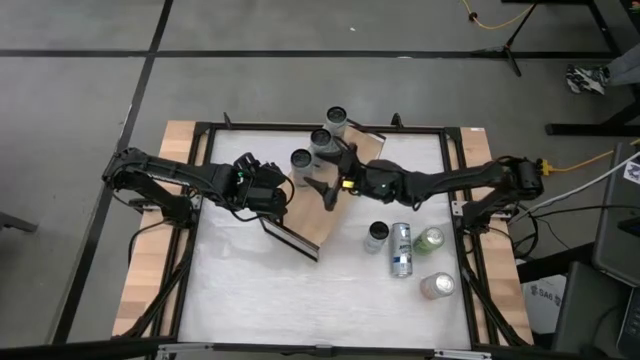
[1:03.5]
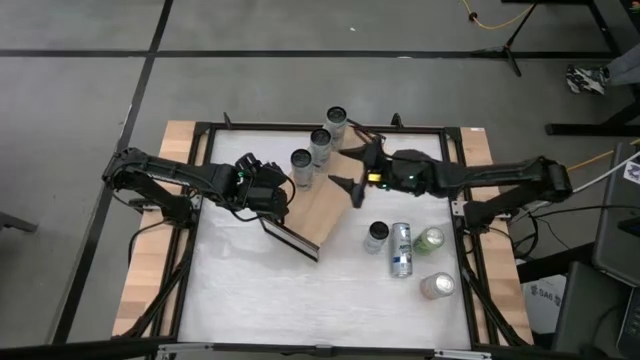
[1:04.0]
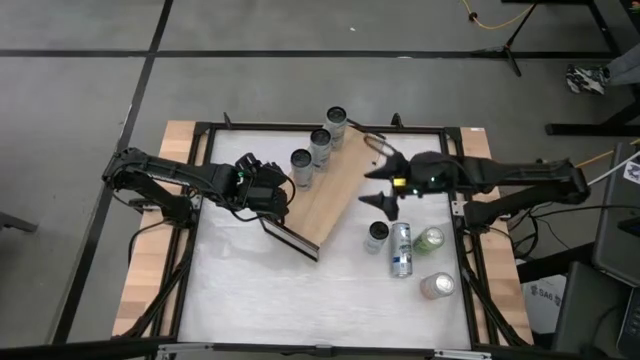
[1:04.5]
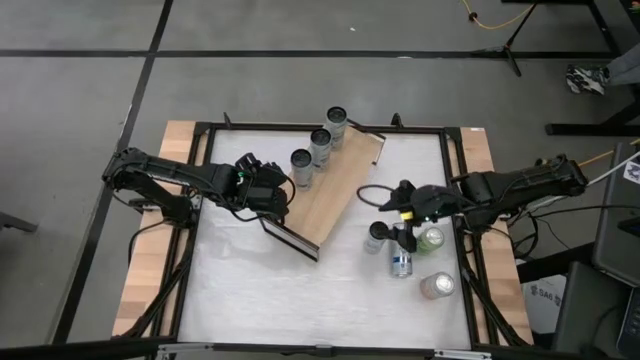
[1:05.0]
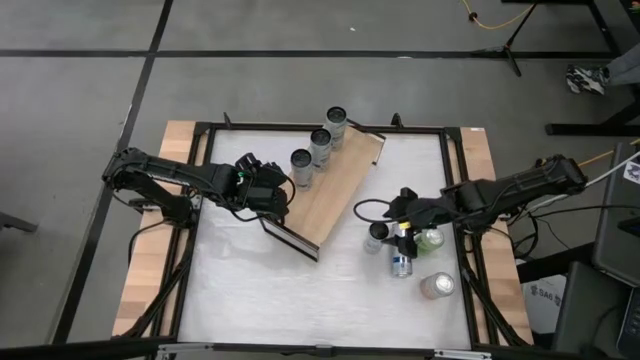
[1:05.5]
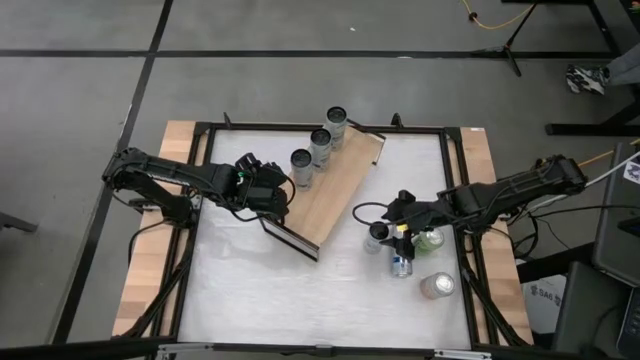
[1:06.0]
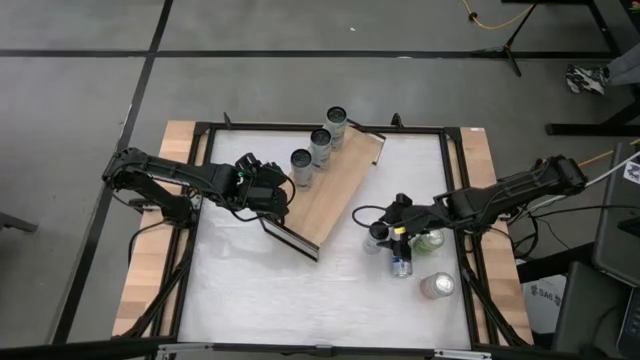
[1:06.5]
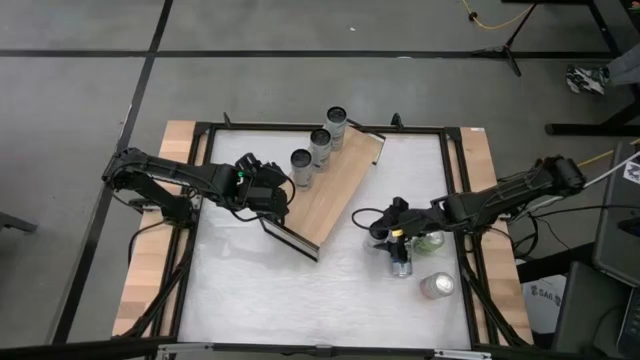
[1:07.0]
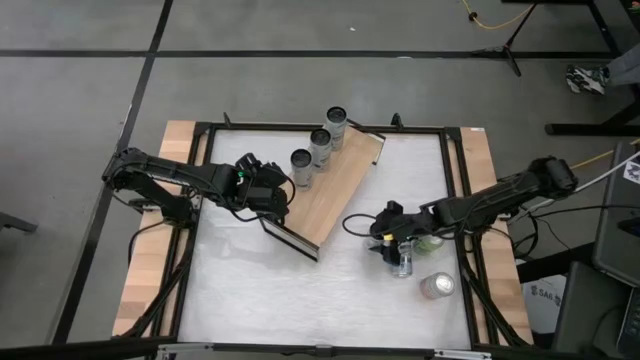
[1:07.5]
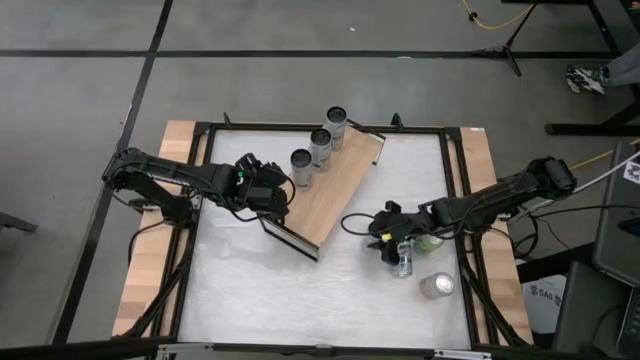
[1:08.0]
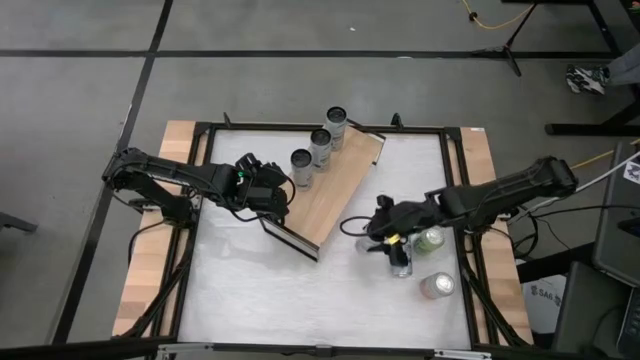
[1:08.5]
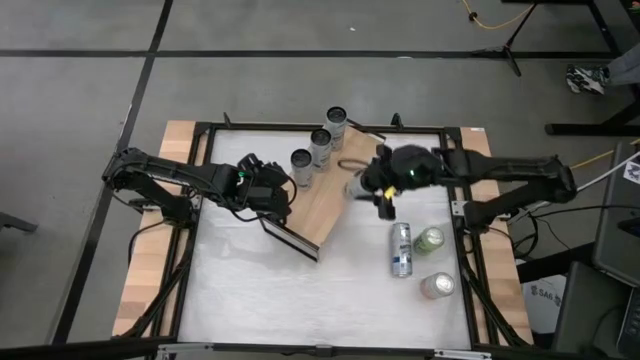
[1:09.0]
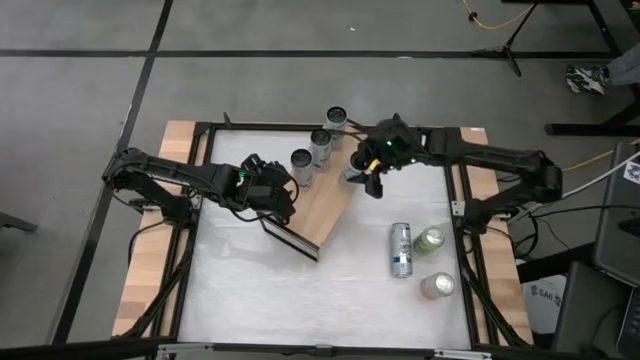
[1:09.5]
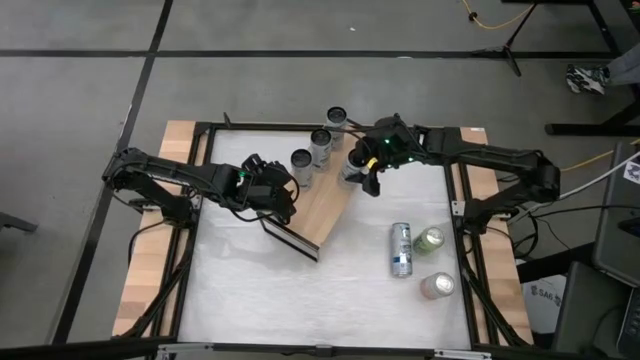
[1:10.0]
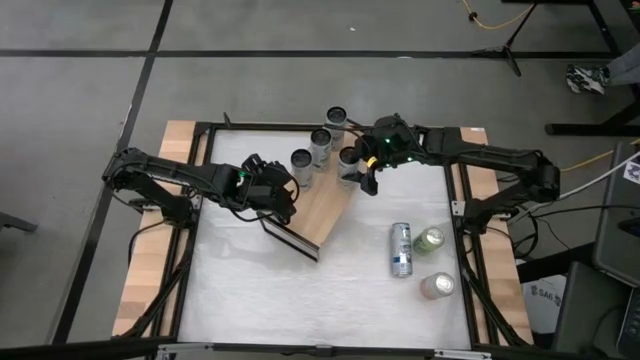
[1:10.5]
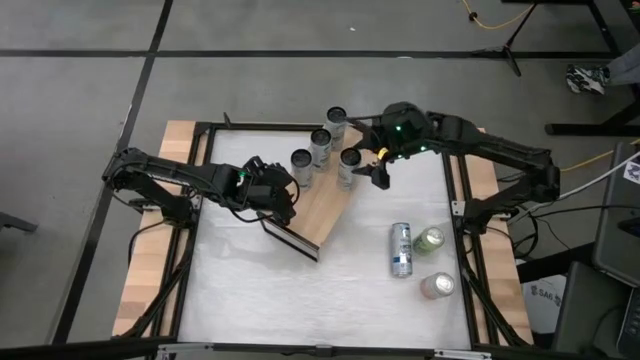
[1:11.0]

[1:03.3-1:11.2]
Task: Place canned beverage on shelf
Put the left white soda can on the shelf

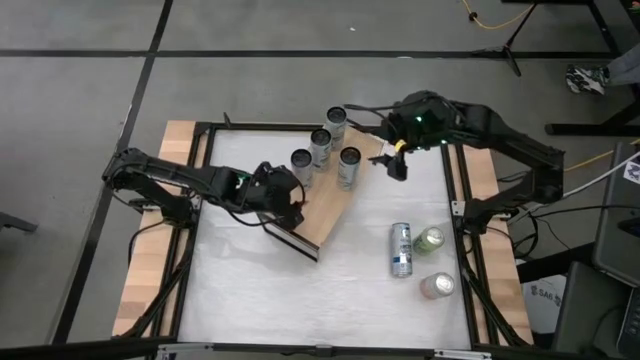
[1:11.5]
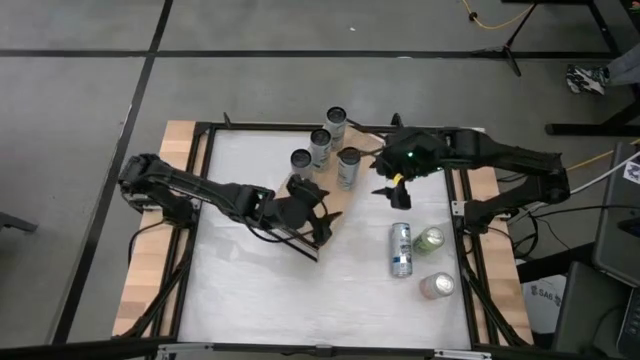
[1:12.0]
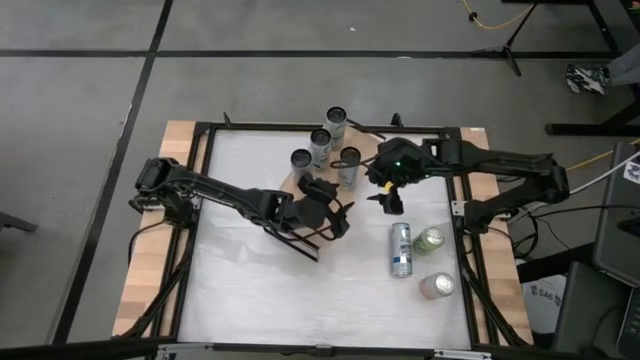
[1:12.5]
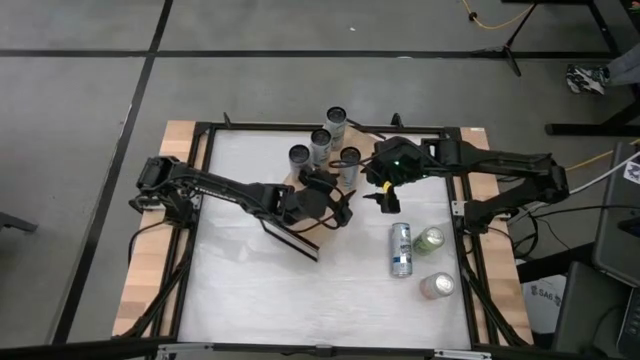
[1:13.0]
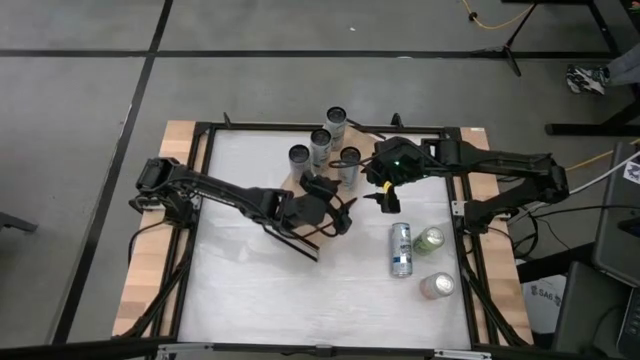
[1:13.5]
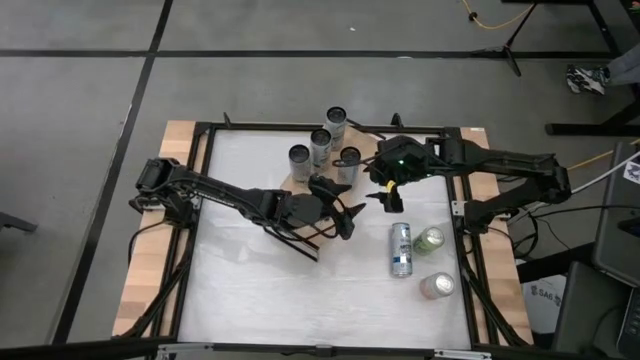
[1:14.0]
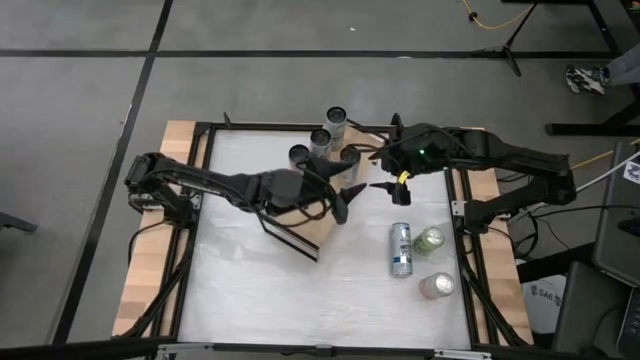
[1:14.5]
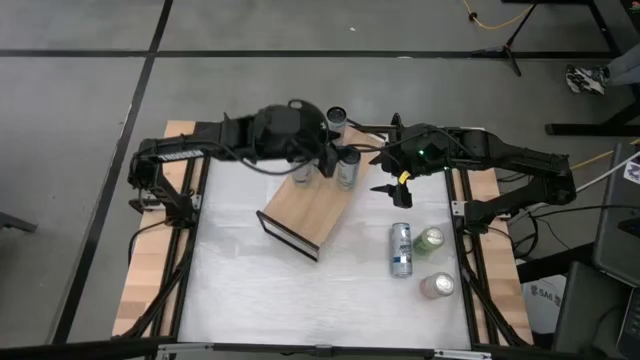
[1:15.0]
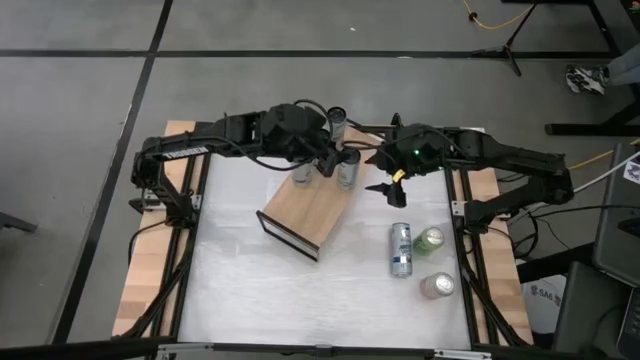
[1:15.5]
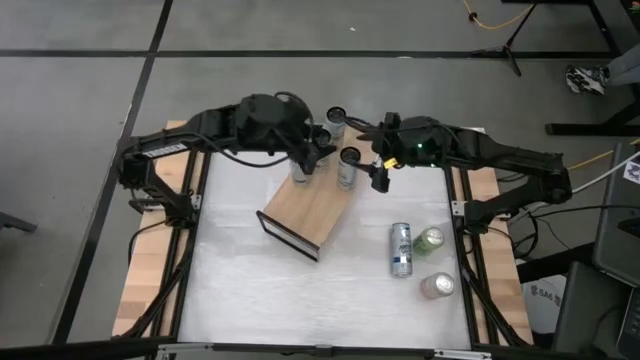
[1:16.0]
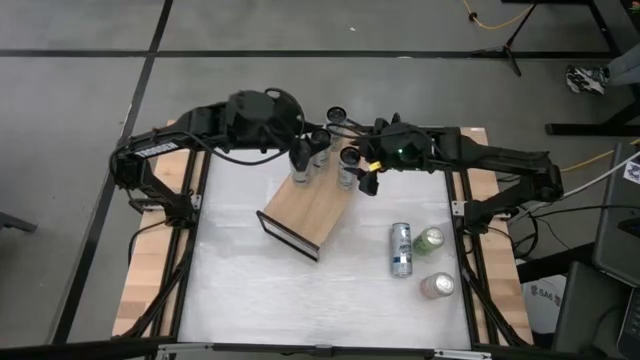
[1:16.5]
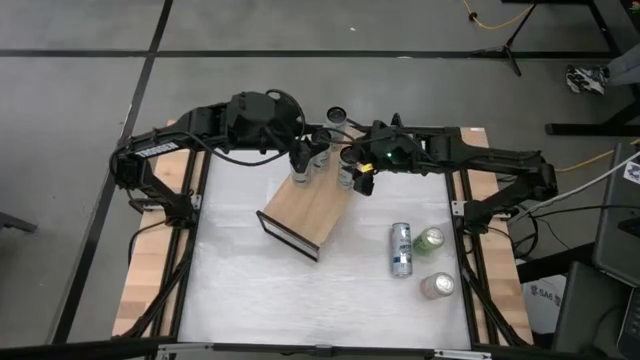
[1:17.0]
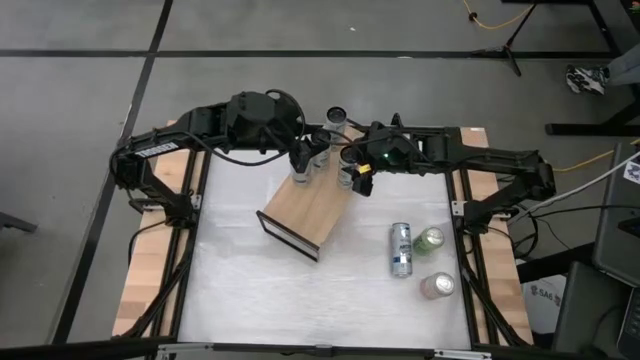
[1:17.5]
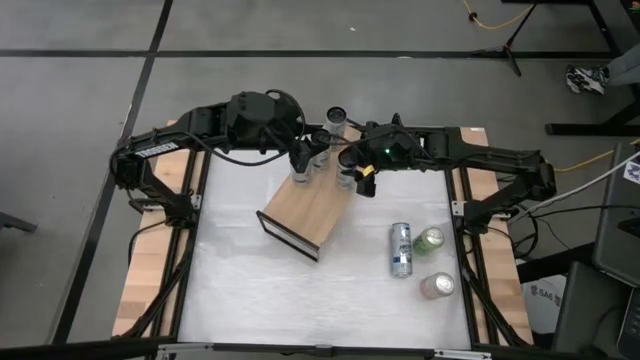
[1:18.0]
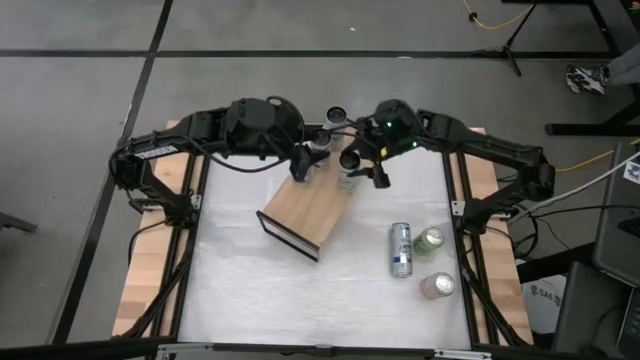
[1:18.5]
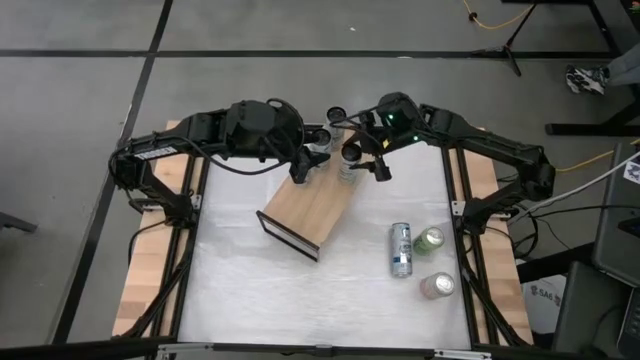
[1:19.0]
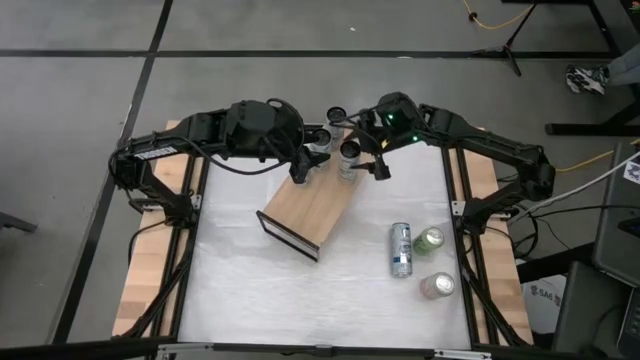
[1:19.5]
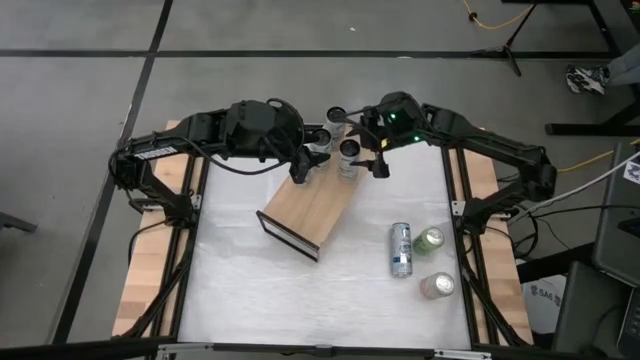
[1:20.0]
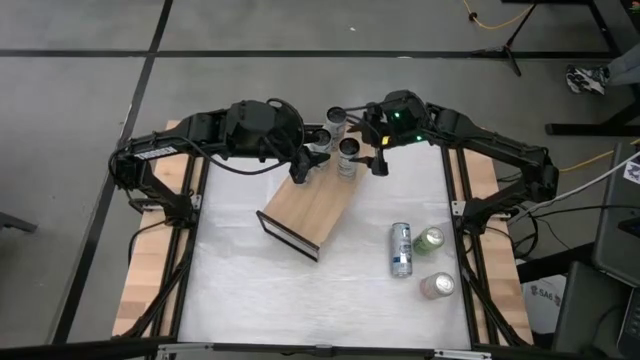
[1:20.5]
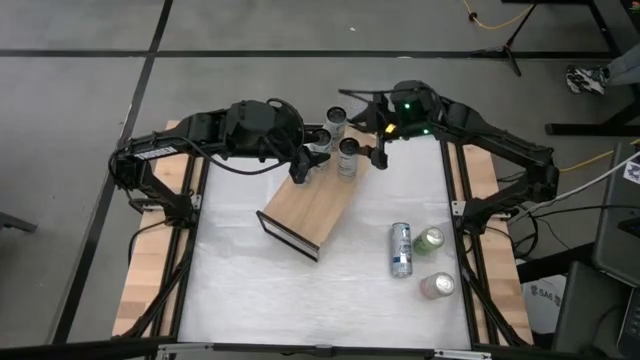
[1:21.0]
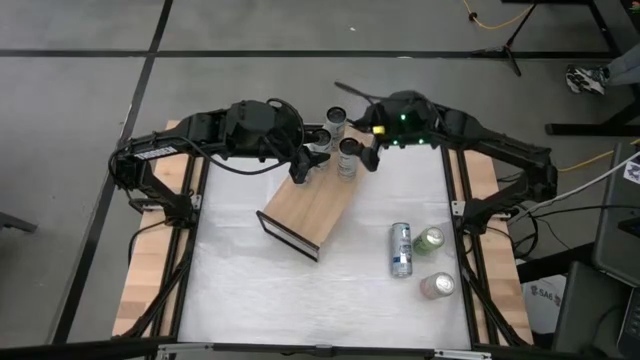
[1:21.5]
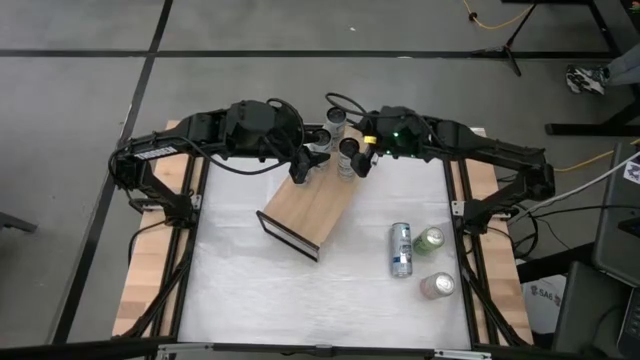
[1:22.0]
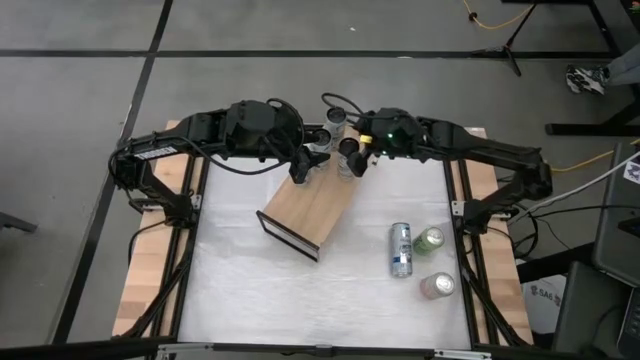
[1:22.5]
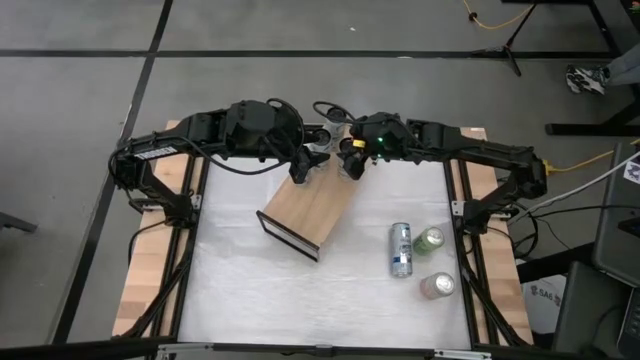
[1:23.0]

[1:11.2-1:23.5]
Adjust the soda can on the shelf
